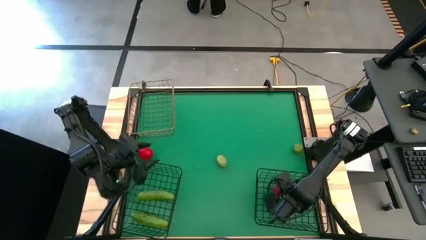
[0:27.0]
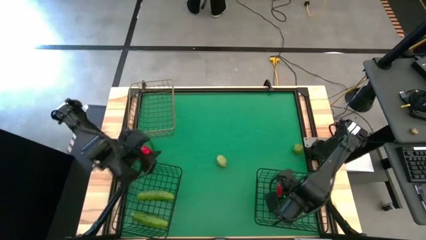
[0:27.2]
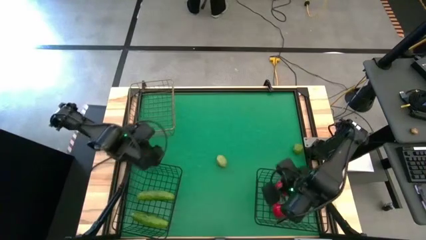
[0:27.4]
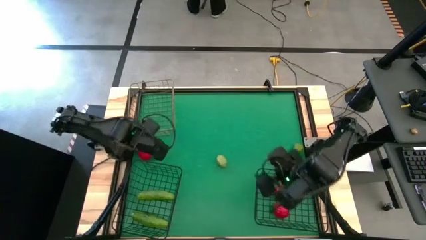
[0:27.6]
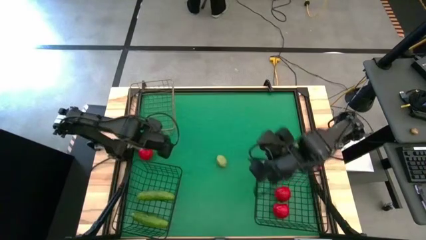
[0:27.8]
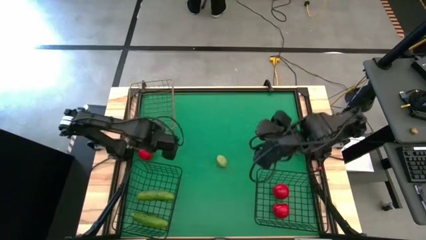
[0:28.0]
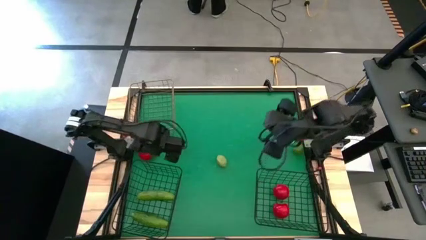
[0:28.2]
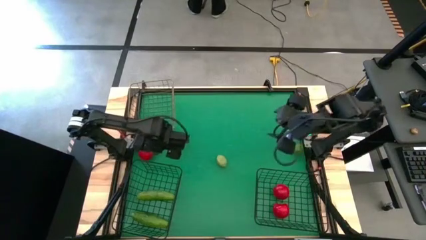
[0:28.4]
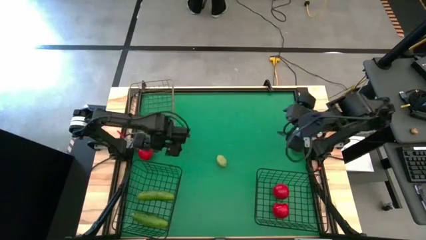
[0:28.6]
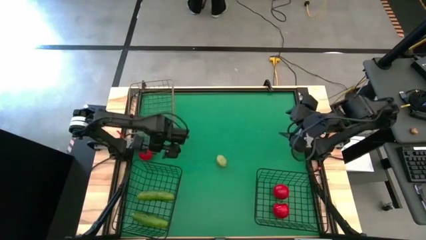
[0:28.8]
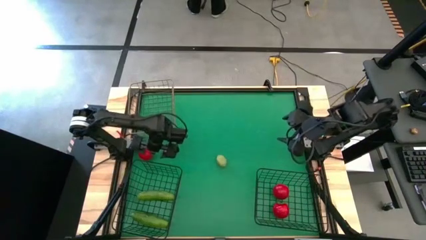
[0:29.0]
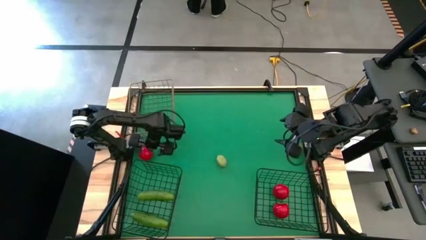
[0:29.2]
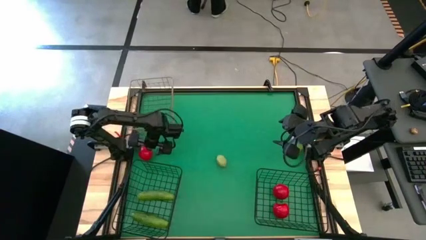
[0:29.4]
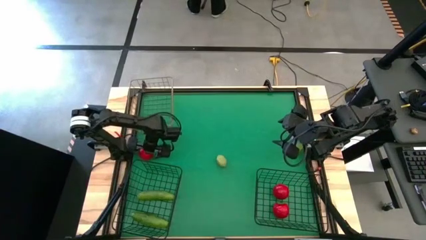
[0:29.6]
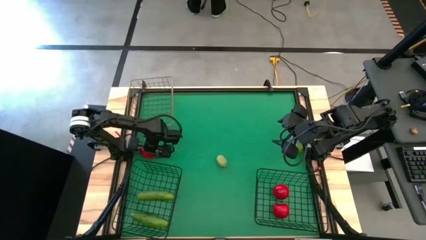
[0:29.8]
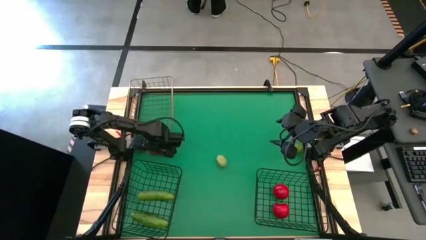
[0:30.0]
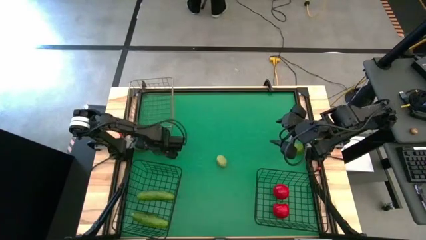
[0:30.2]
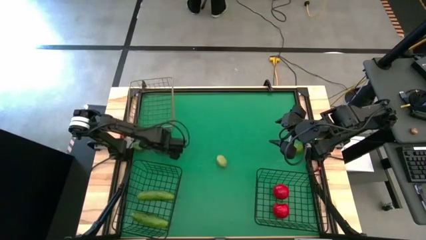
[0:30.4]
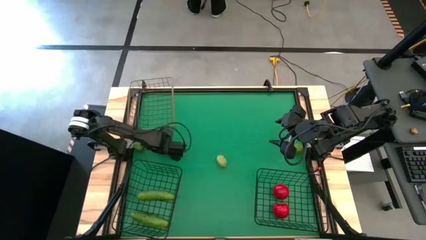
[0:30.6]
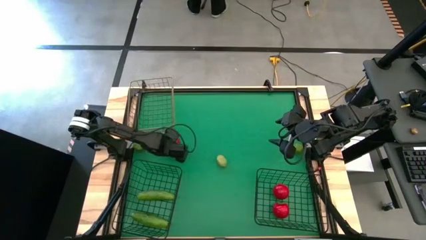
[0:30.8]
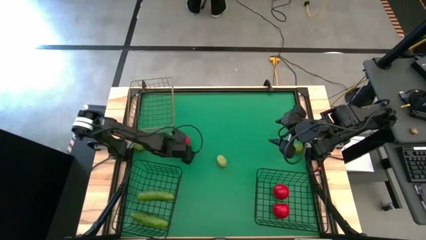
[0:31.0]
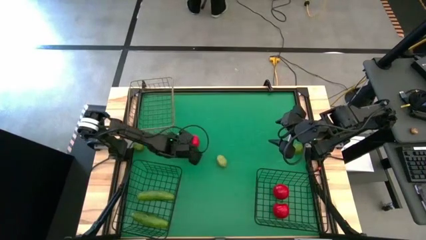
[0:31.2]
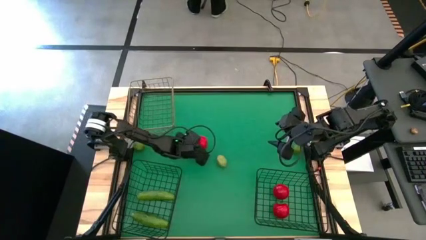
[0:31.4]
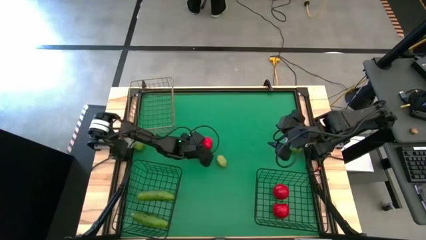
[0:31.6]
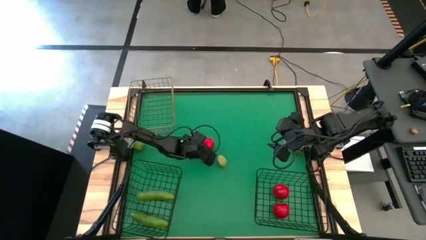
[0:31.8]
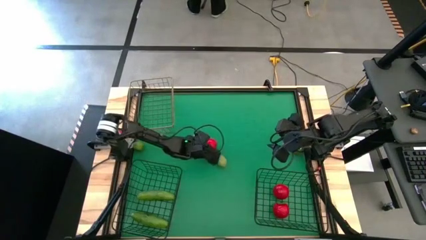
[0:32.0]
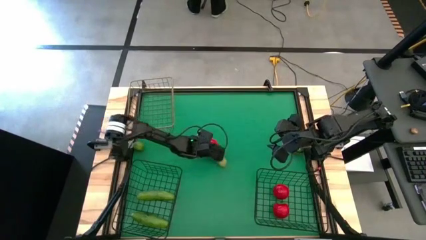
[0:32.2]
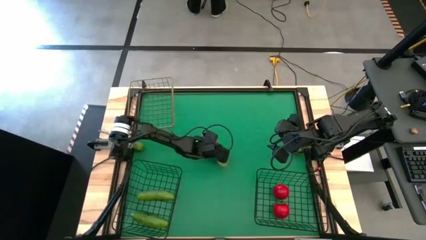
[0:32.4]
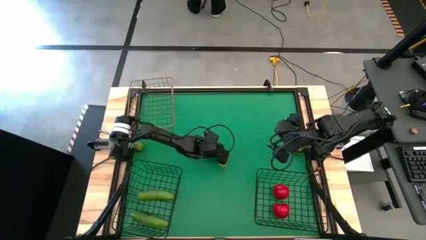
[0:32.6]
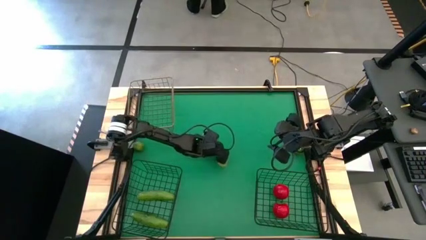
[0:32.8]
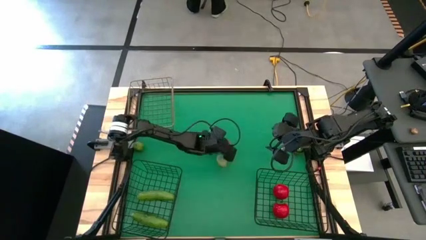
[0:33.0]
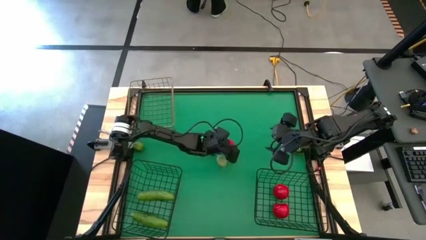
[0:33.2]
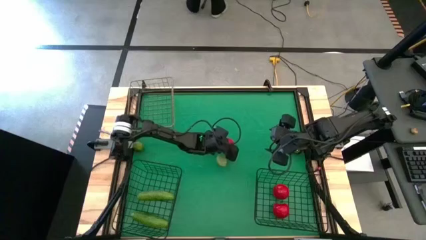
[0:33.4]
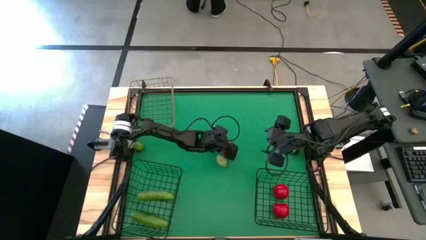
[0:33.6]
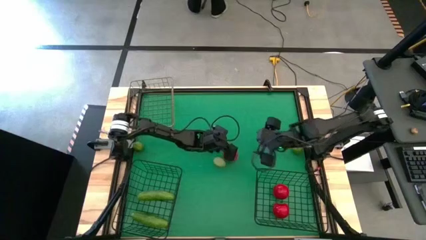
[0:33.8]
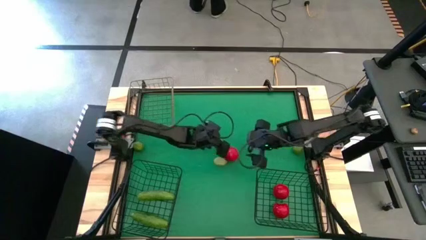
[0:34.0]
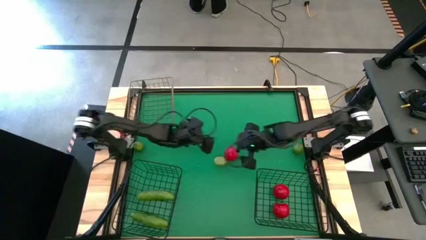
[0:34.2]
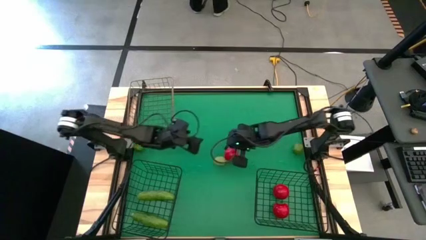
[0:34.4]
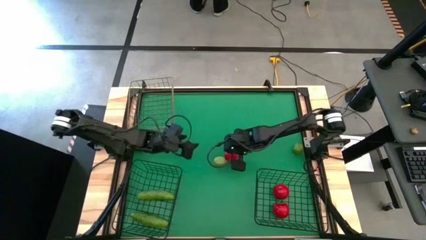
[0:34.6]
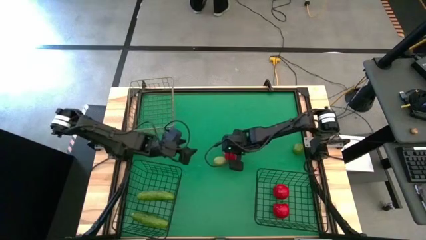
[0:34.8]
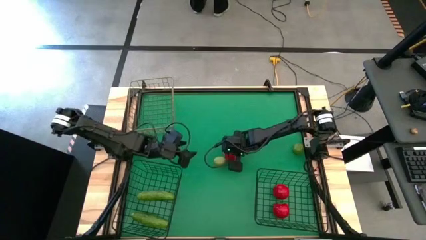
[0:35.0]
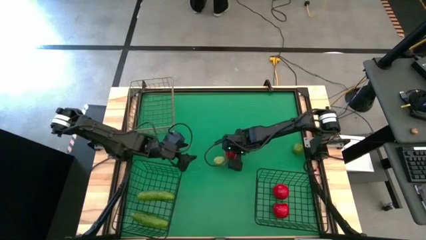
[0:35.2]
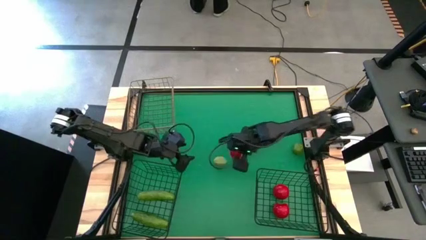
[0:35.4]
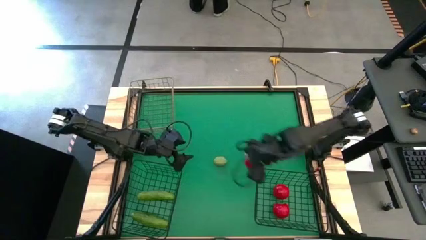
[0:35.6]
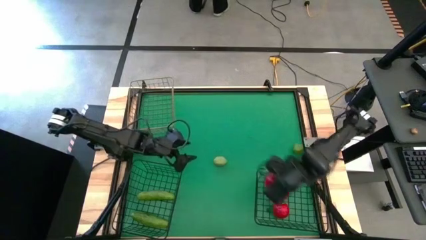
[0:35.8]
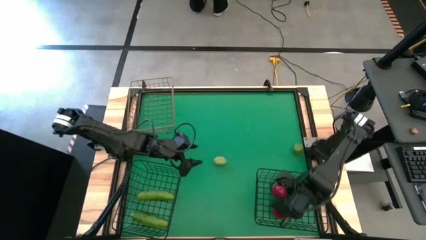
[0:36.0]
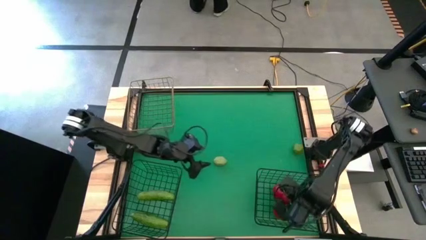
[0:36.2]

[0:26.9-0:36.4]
Task: Sort produce into baskets
Put the tomato into the bottom right wire basket

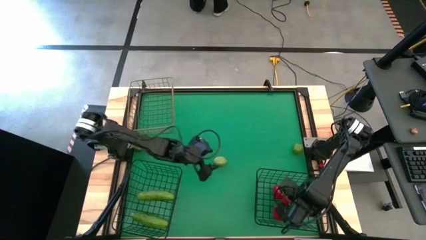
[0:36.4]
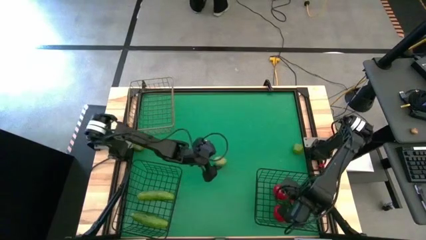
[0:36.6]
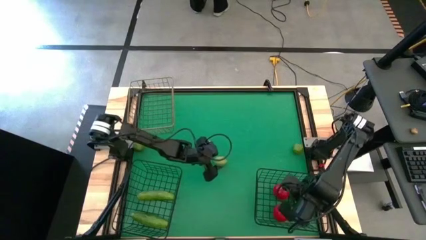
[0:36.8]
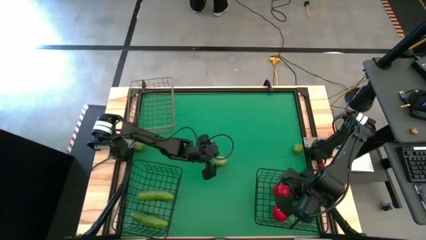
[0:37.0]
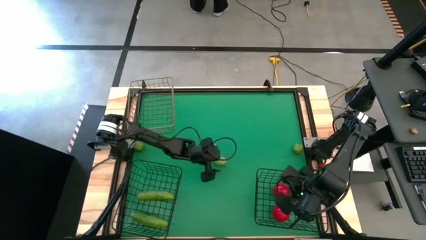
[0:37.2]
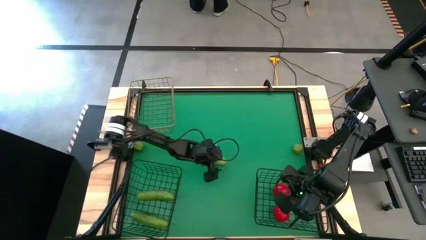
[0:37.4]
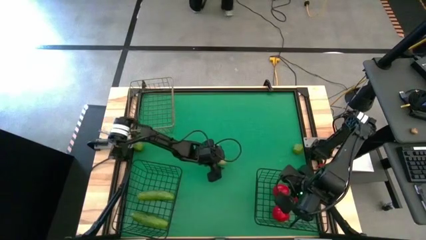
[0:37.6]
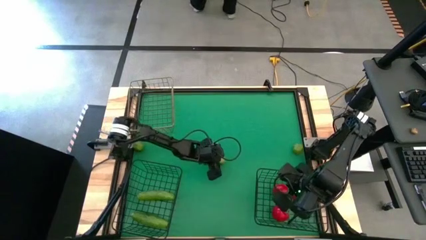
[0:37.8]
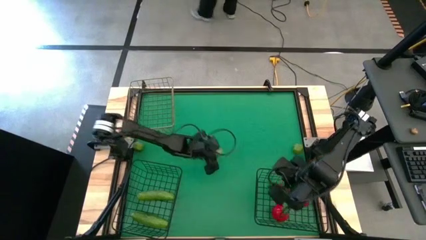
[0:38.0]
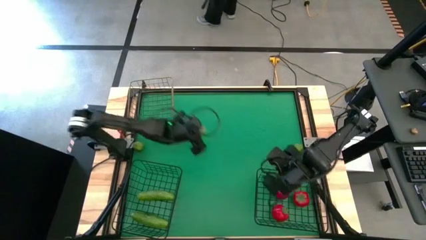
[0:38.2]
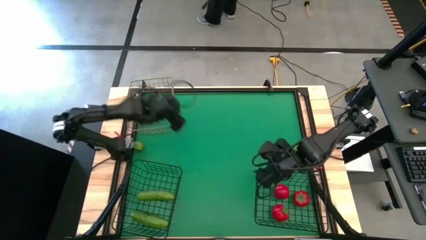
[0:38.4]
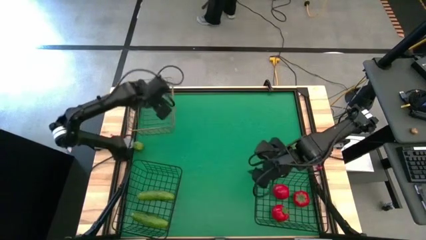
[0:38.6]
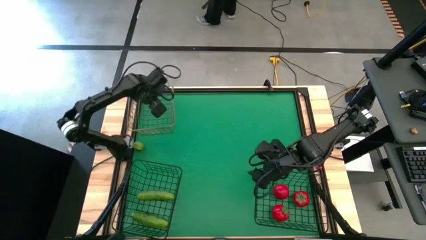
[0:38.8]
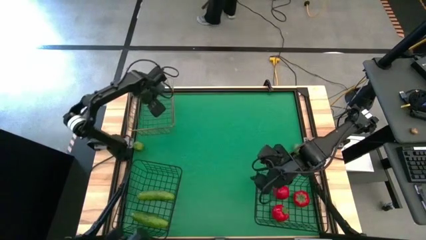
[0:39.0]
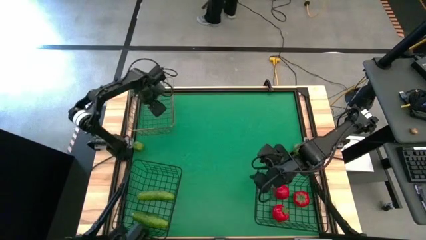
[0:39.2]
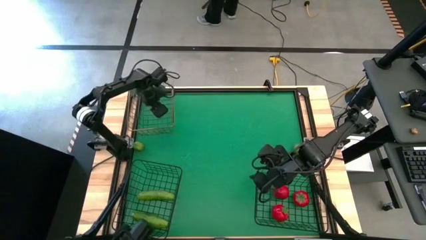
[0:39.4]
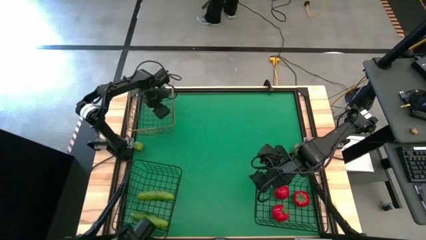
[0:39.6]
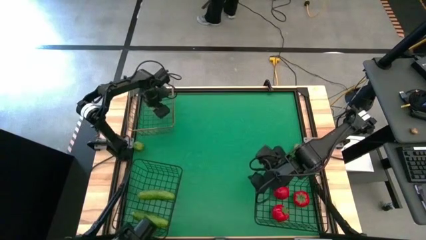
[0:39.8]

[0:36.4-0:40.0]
Put the center lime into the top left wire basket
